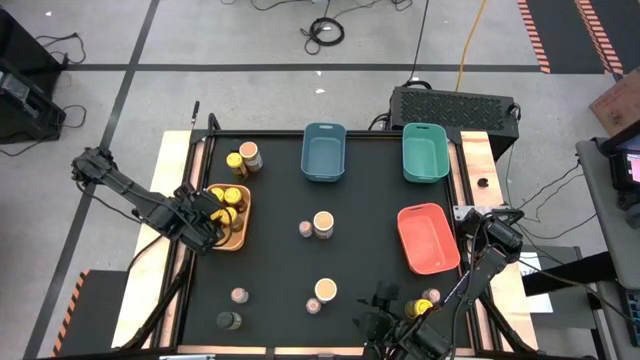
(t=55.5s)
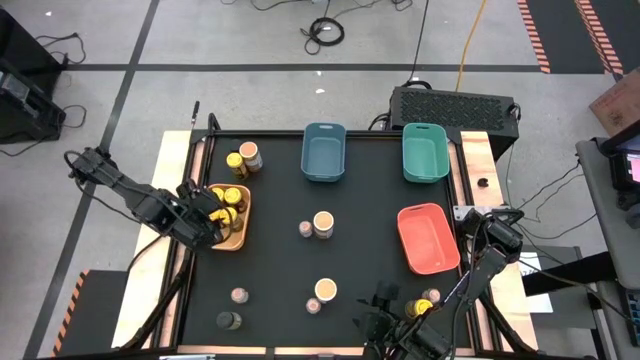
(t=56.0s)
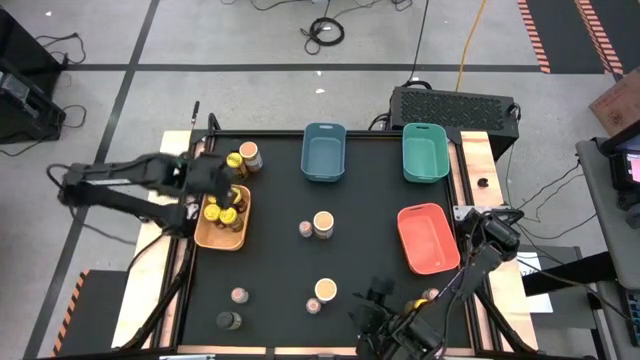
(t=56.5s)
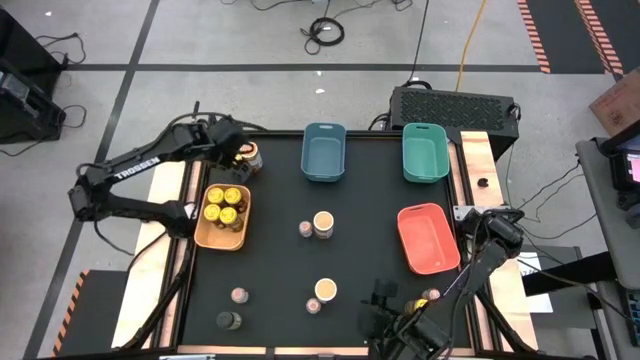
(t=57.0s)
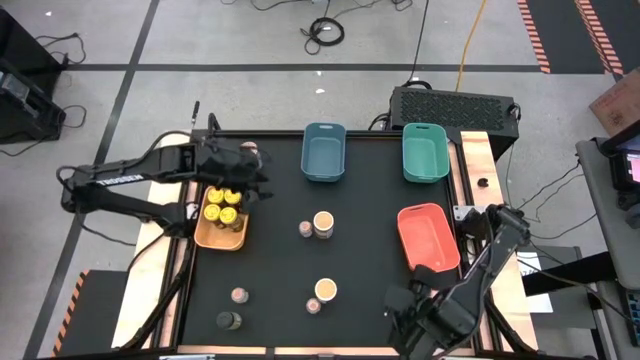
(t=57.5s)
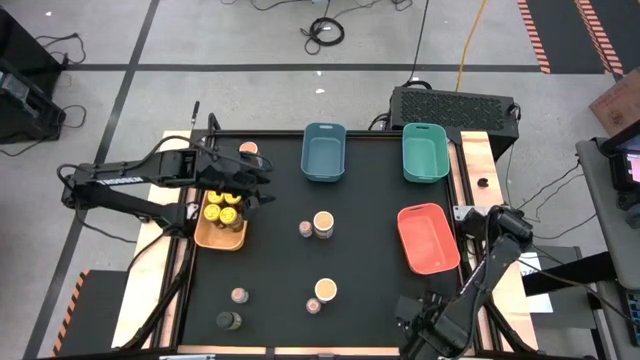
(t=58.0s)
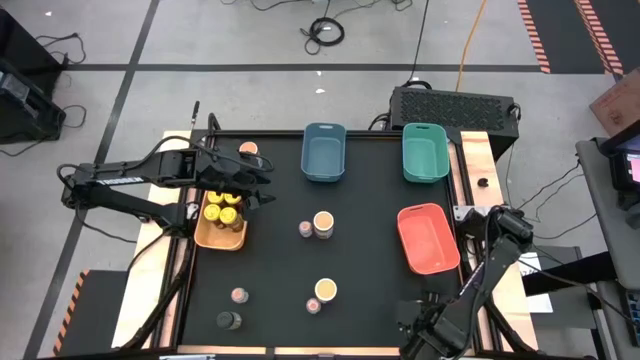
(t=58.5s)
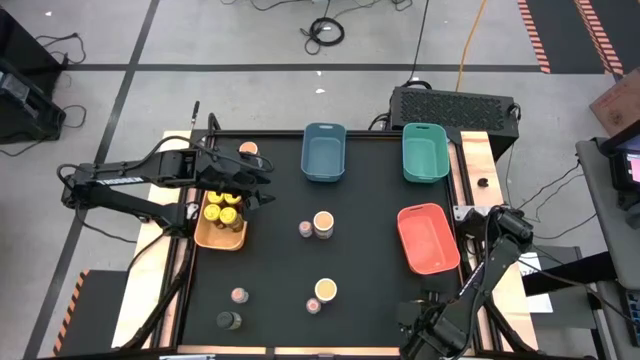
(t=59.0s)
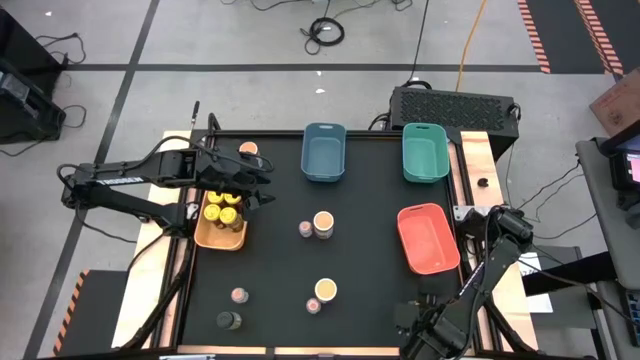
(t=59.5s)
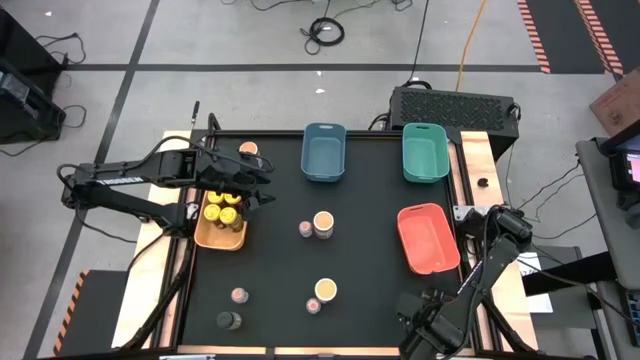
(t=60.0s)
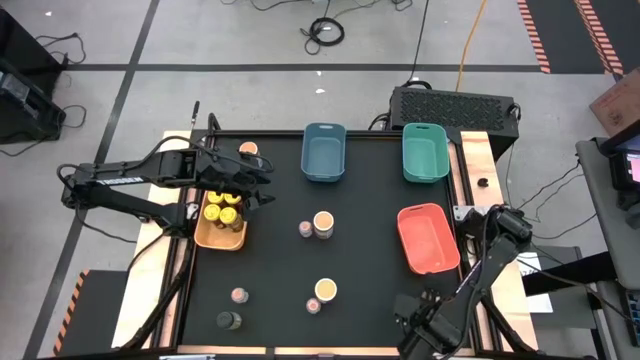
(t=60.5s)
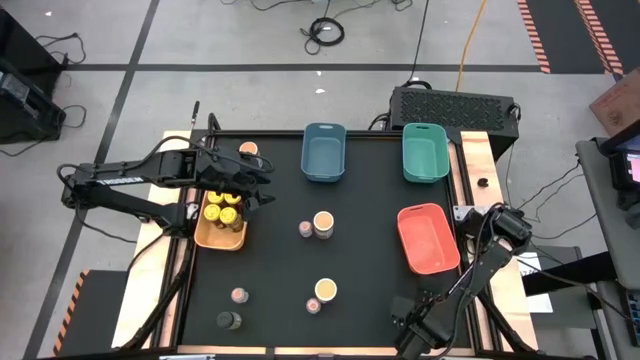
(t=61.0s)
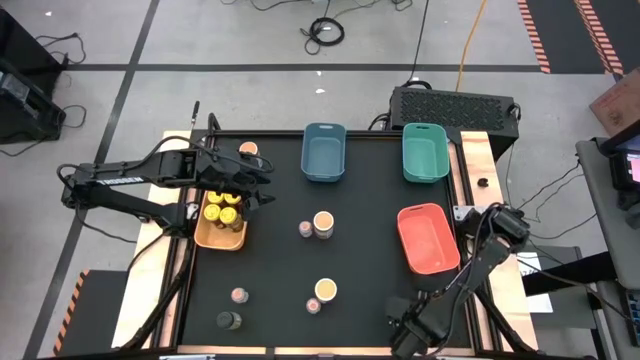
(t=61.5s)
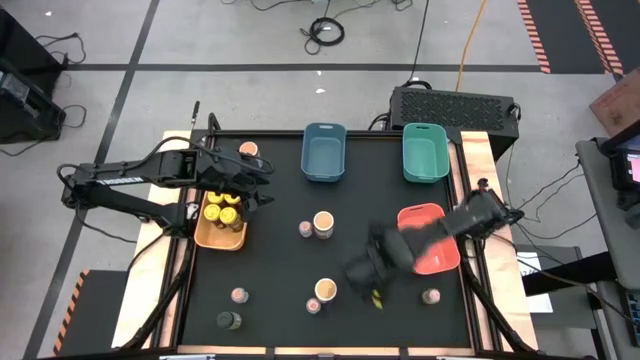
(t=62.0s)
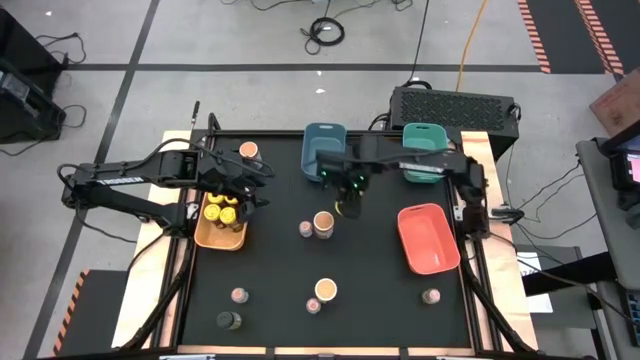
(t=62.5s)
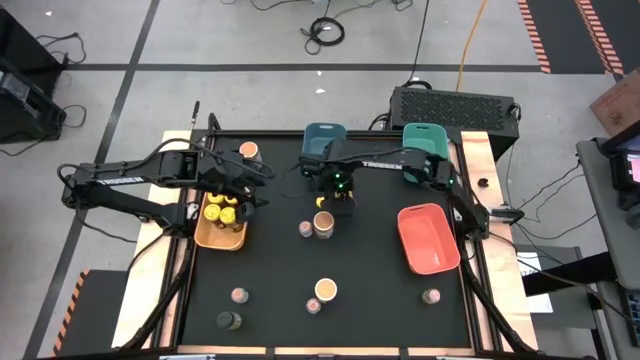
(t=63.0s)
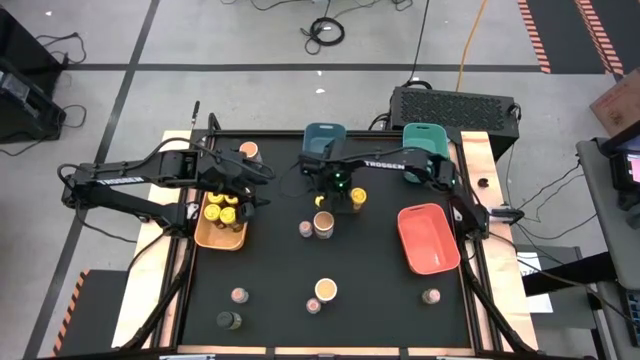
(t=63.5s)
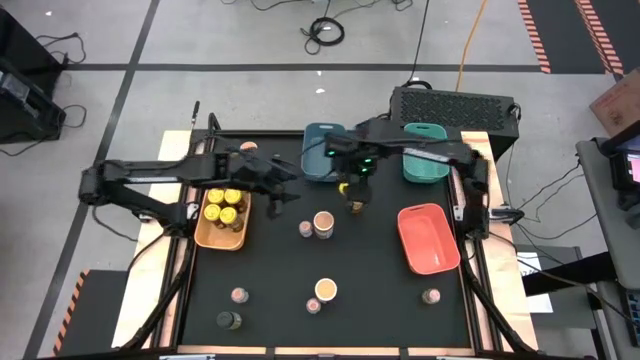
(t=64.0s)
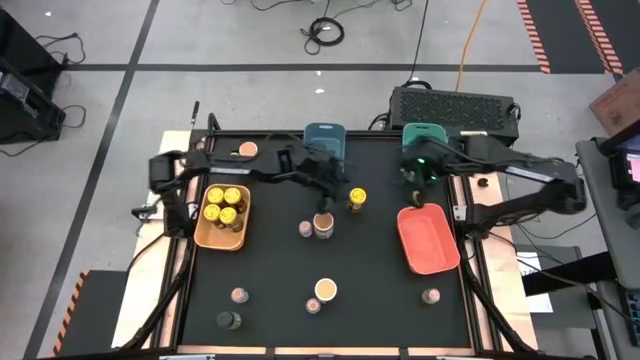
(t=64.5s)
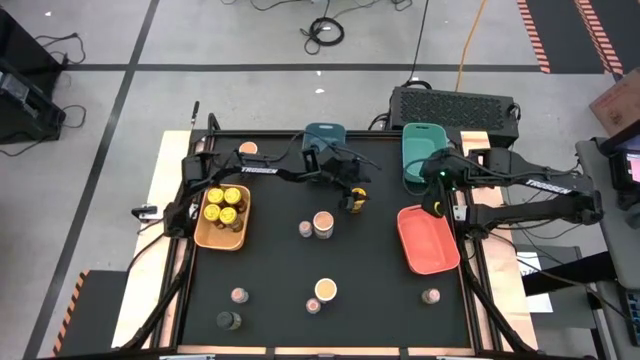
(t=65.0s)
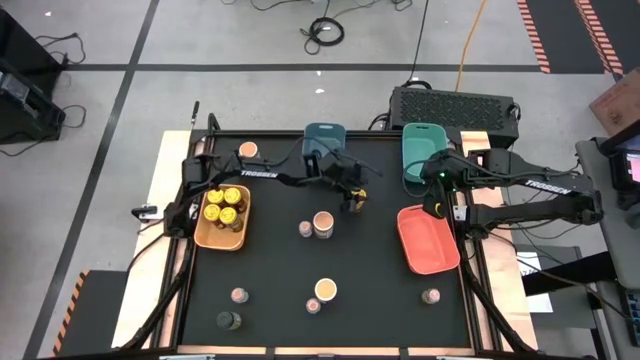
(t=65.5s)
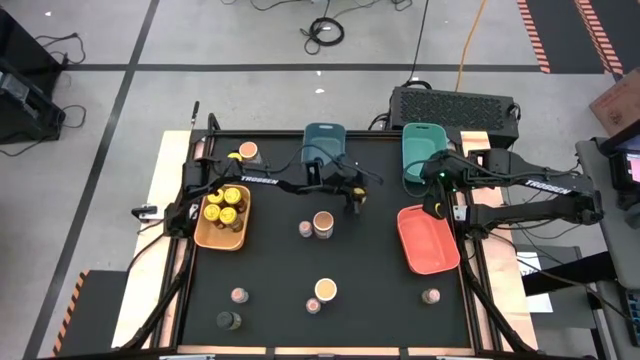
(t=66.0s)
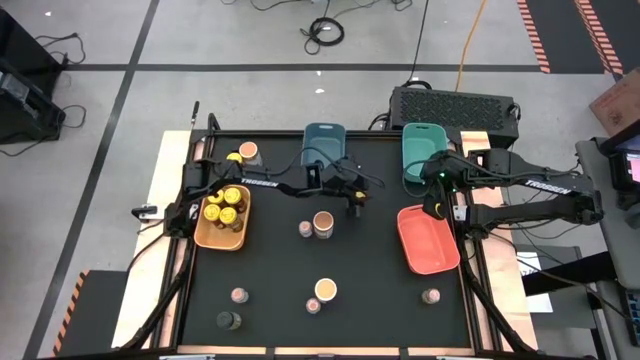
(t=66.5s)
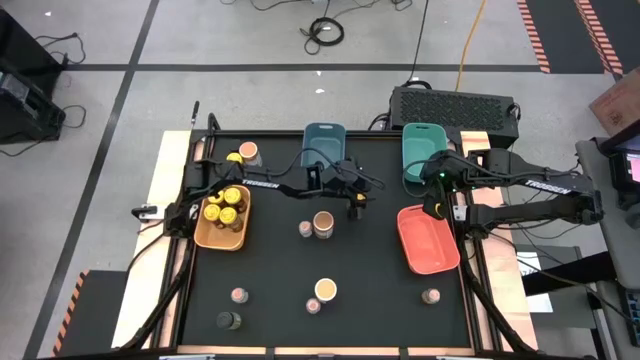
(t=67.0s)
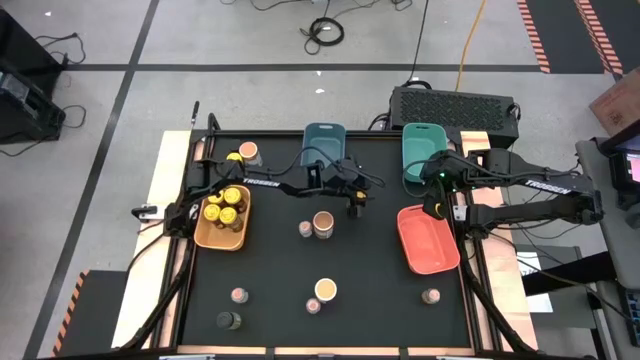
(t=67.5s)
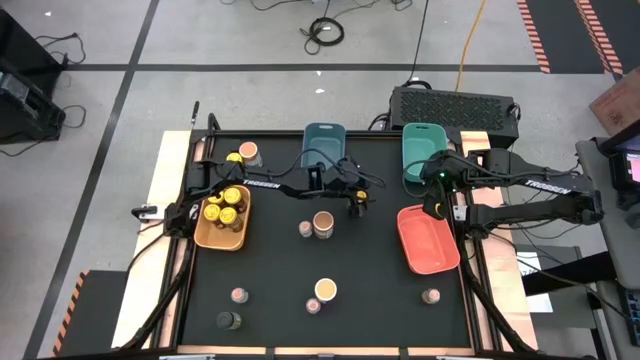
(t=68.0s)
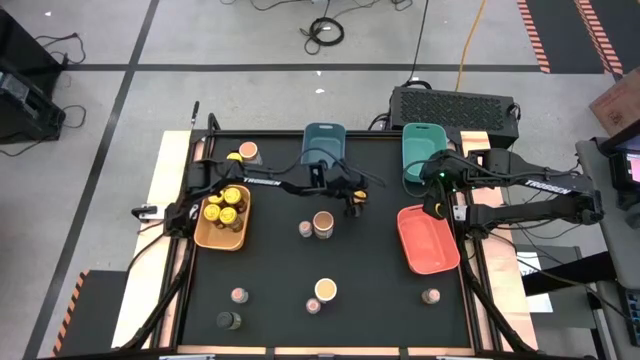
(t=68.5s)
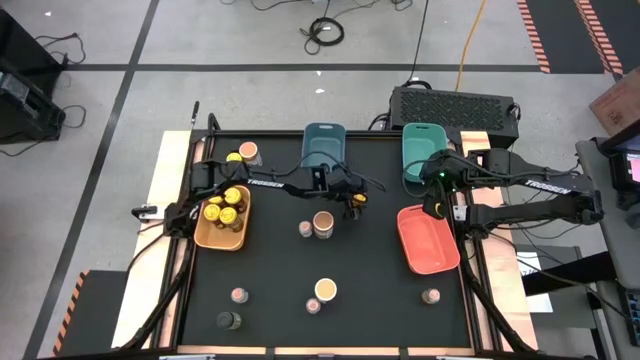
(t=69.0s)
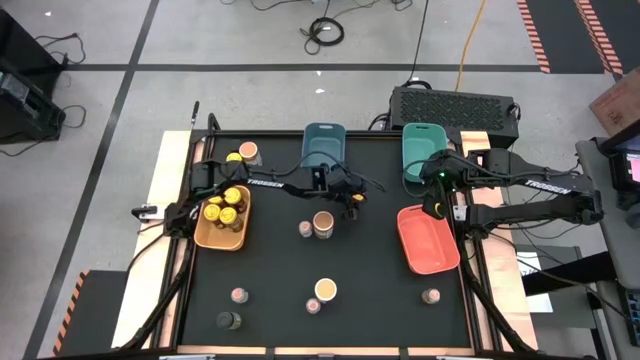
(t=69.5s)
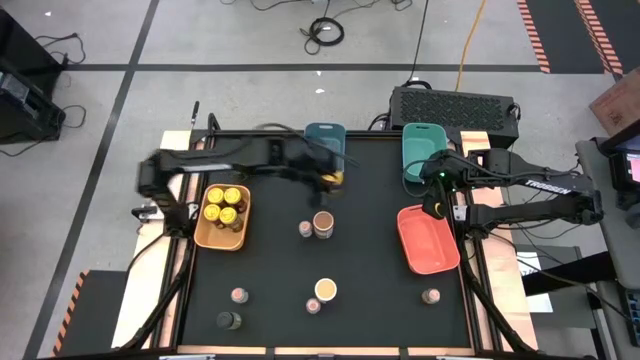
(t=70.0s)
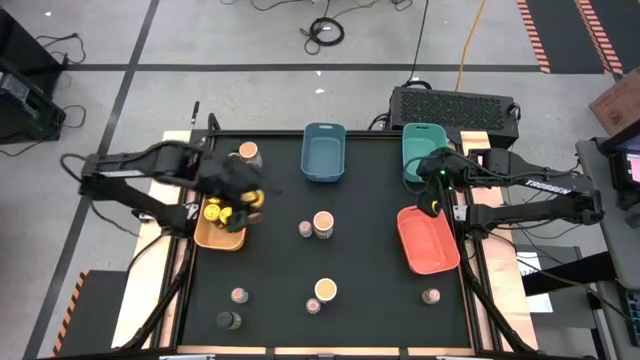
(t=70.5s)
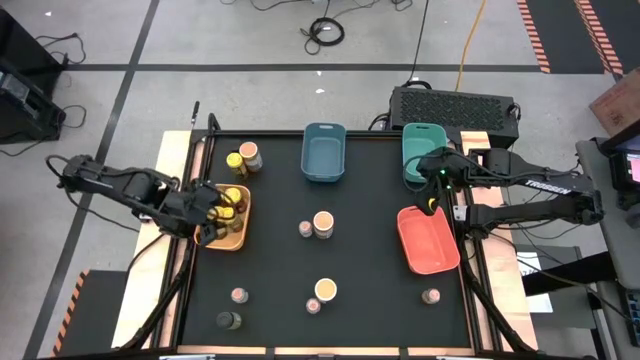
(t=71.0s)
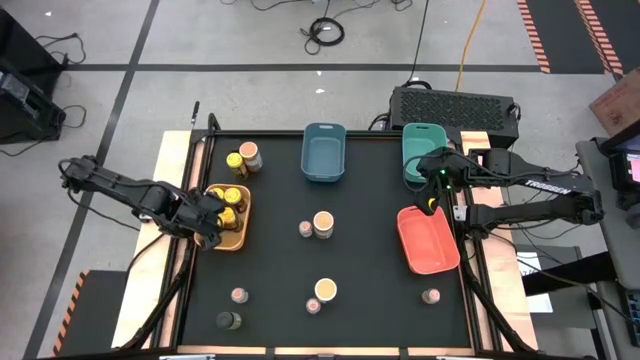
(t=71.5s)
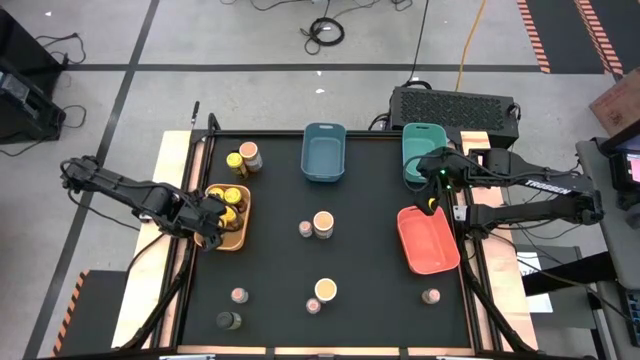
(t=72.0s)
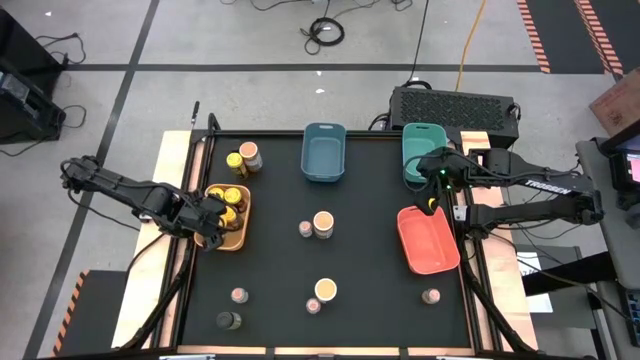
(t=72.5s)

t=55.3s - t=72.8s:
Task: Sort spices by type
Put the yellow seasoning can into the yellow bin

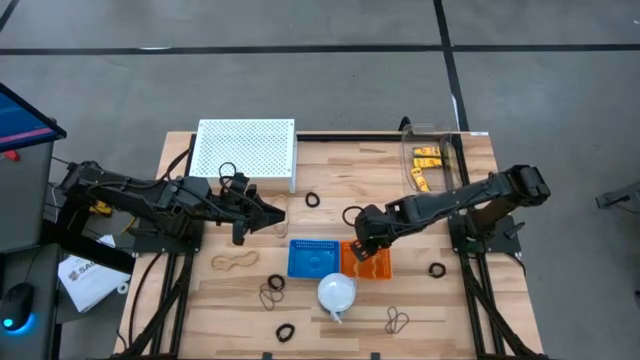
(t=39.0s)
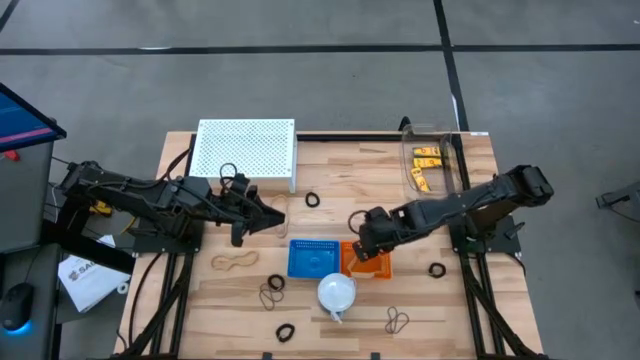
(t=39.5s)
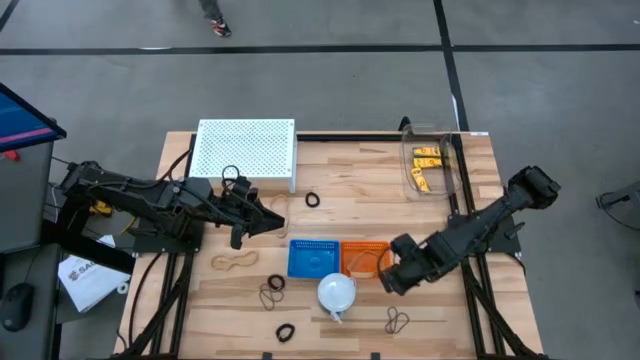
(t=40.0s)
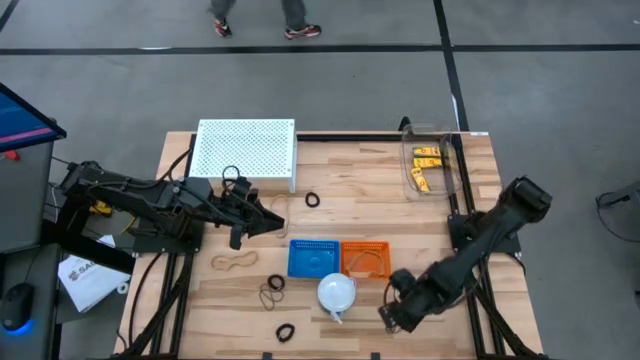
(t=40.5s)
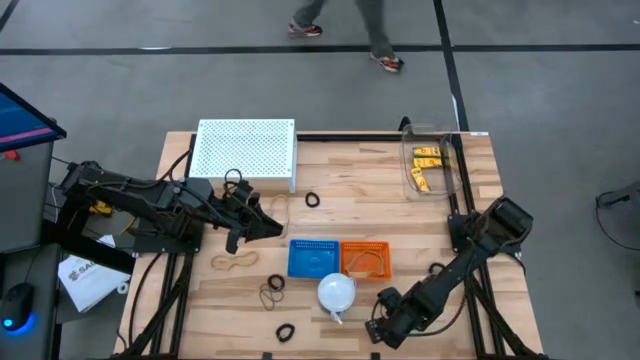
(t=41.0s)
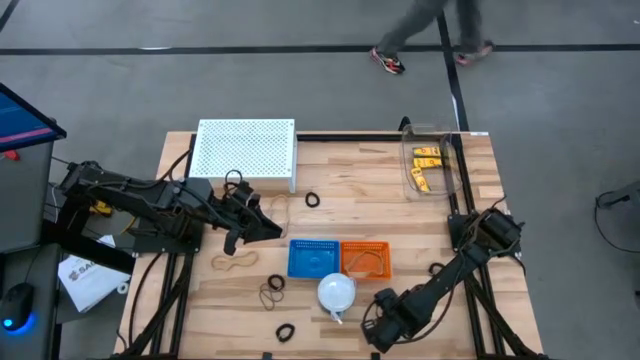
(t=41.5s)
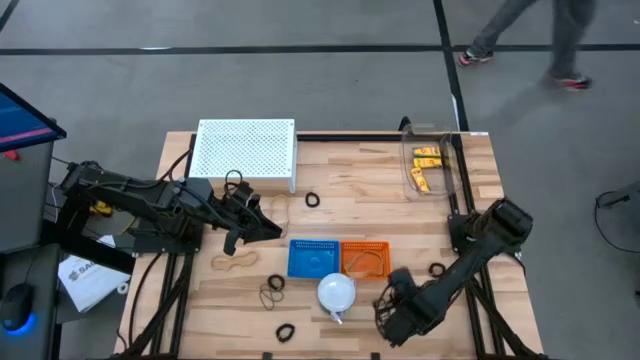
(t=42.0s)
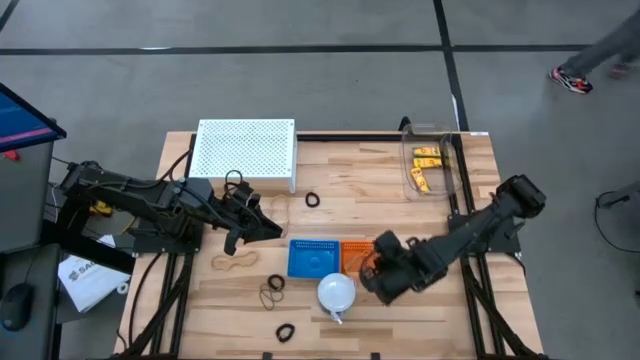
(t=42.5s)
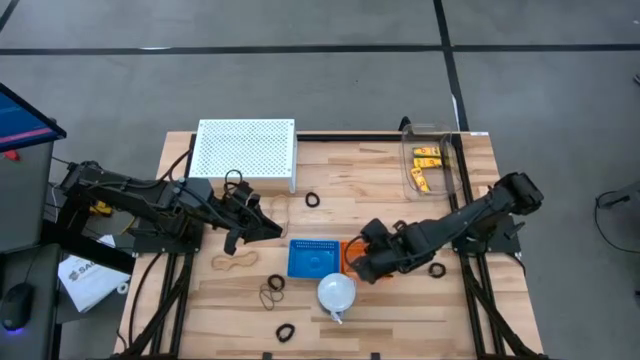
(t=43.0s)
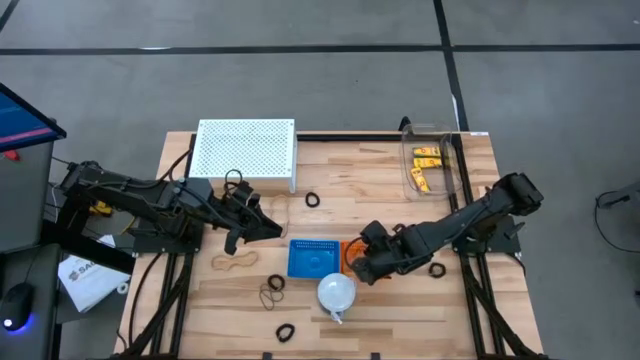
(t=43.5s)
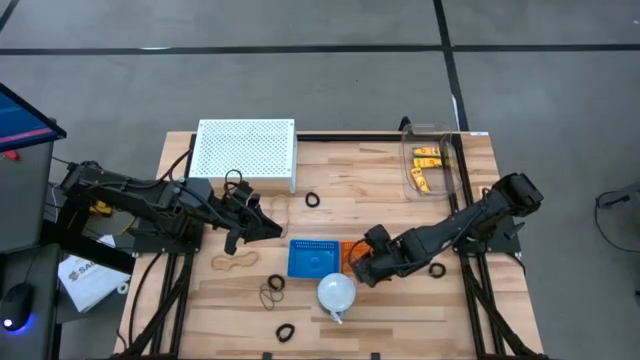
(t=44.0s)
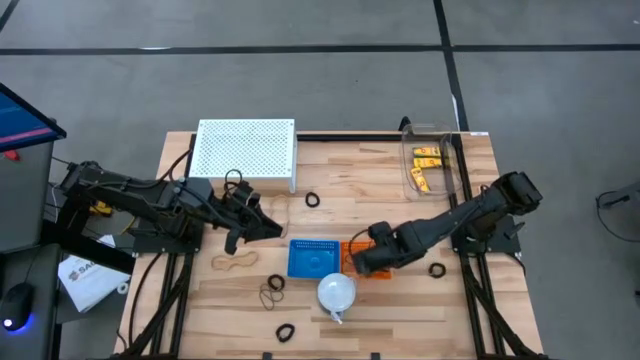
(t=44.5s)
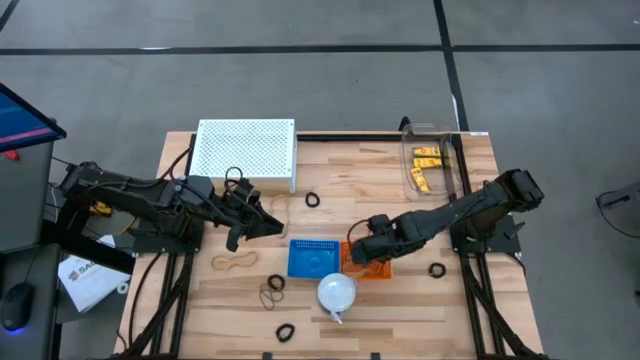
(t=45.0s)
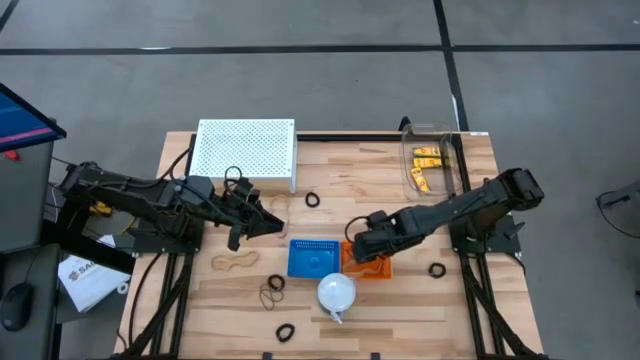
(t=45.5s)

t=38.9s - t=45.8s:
Task: Pick & Place Office Desk Supplies
Put the right black rubber band into the orange basket
